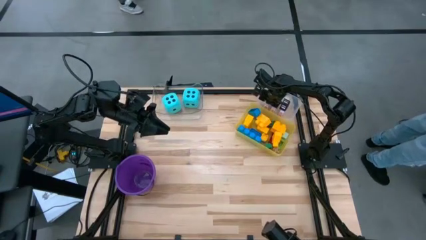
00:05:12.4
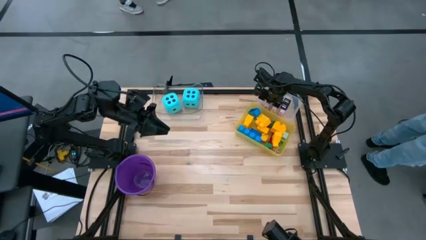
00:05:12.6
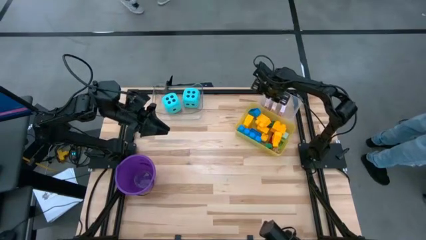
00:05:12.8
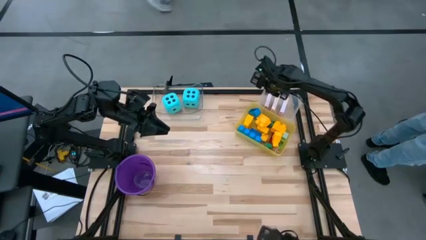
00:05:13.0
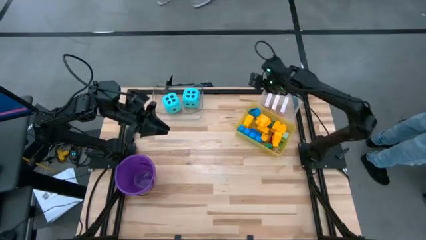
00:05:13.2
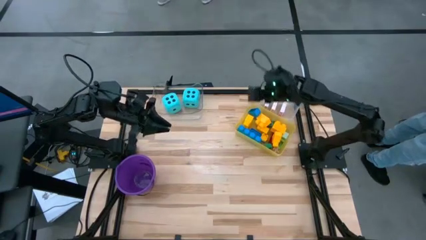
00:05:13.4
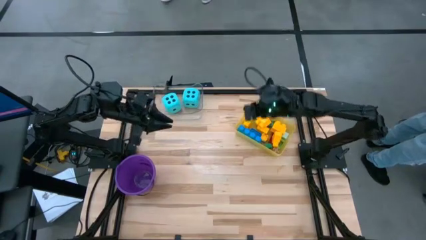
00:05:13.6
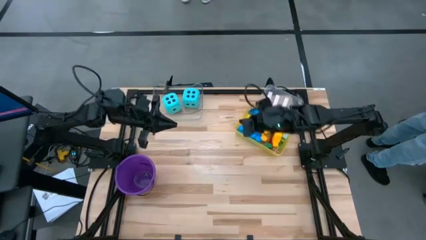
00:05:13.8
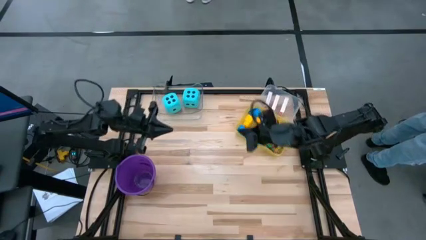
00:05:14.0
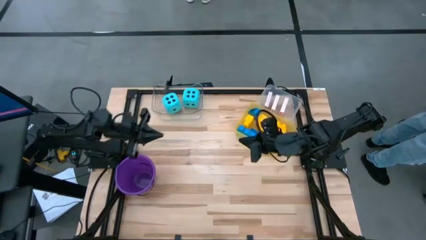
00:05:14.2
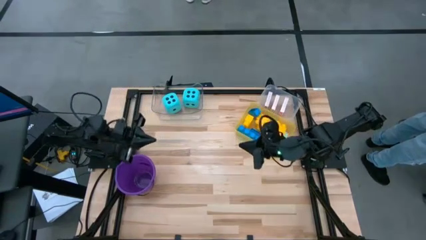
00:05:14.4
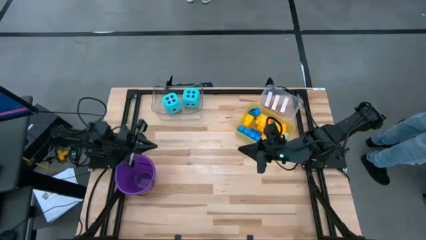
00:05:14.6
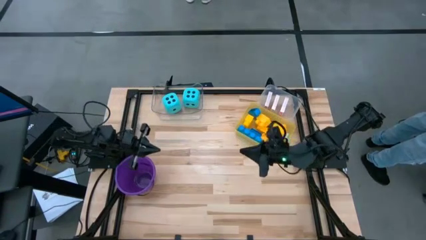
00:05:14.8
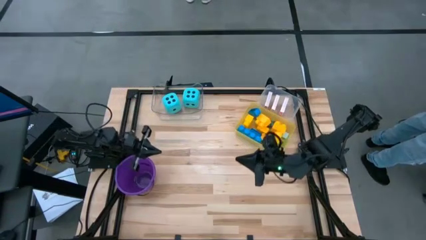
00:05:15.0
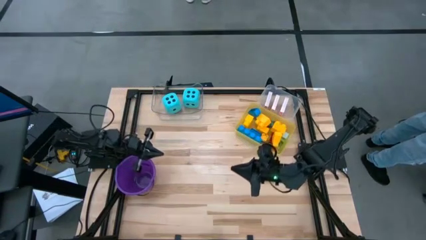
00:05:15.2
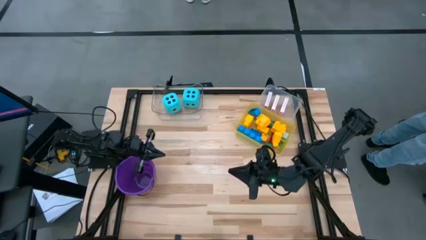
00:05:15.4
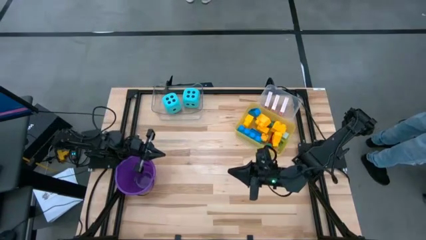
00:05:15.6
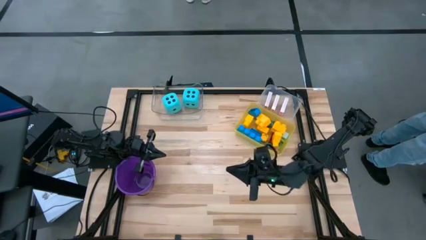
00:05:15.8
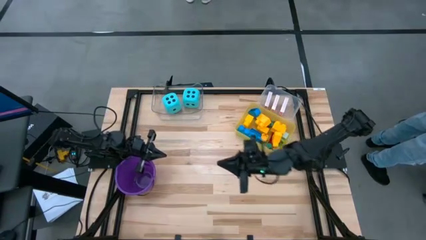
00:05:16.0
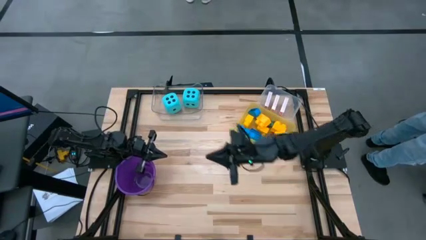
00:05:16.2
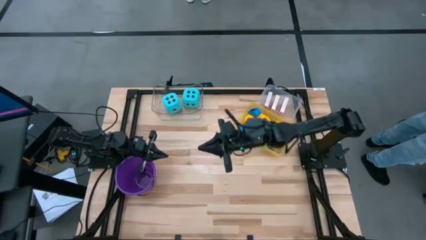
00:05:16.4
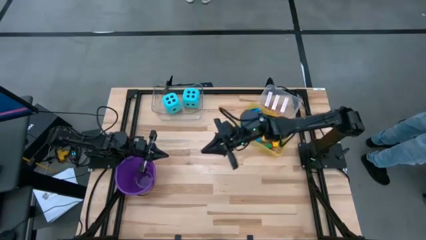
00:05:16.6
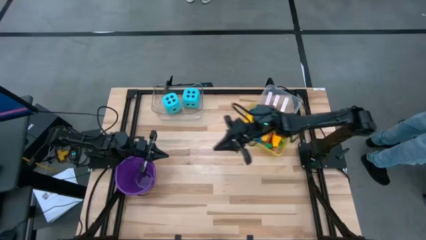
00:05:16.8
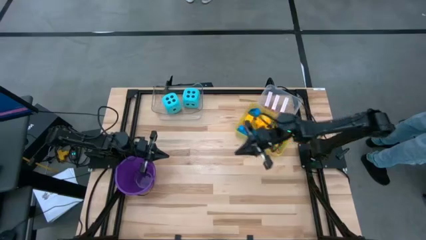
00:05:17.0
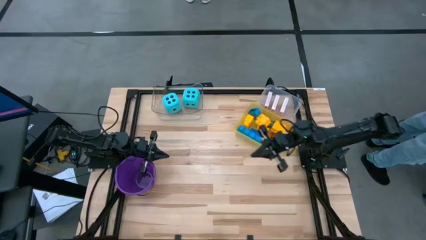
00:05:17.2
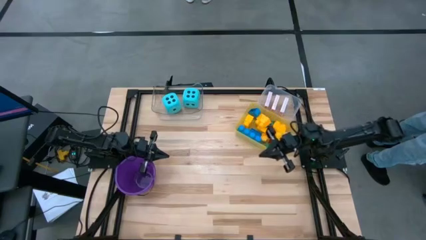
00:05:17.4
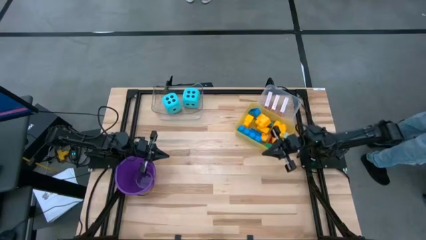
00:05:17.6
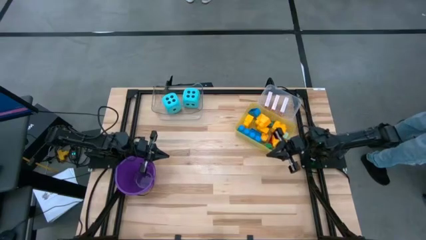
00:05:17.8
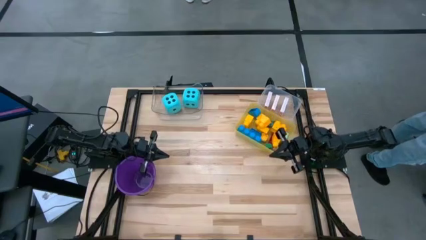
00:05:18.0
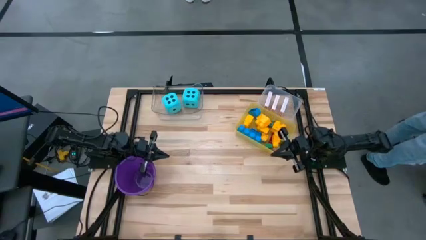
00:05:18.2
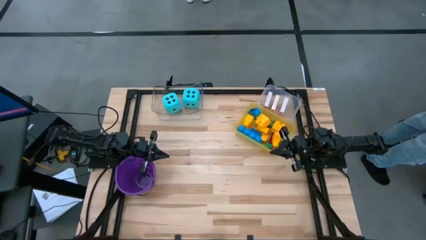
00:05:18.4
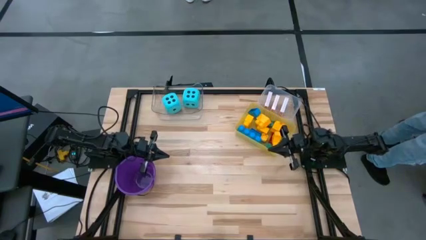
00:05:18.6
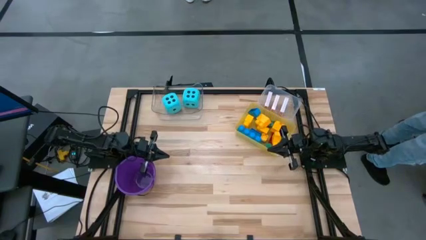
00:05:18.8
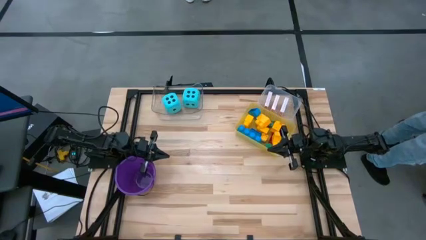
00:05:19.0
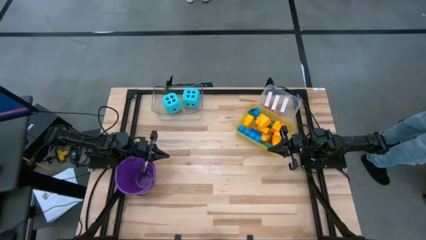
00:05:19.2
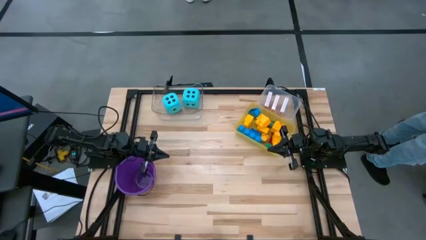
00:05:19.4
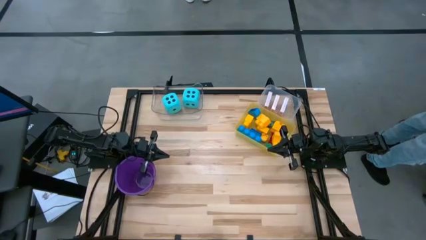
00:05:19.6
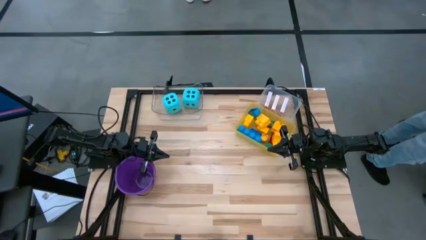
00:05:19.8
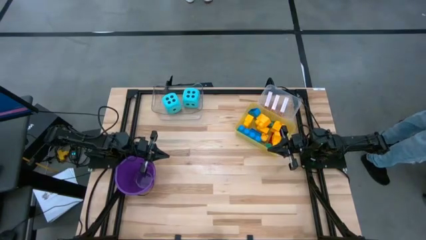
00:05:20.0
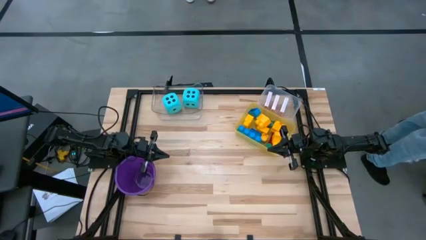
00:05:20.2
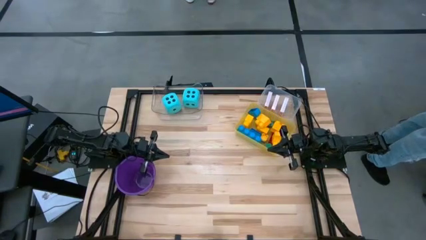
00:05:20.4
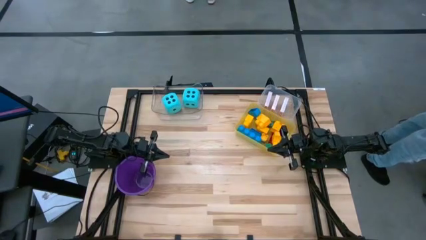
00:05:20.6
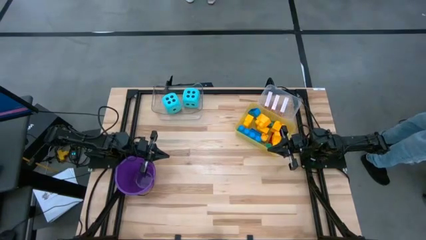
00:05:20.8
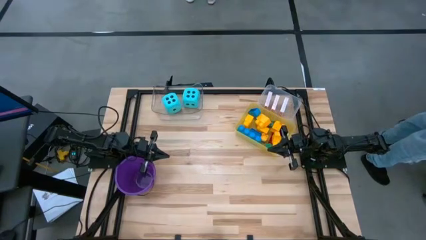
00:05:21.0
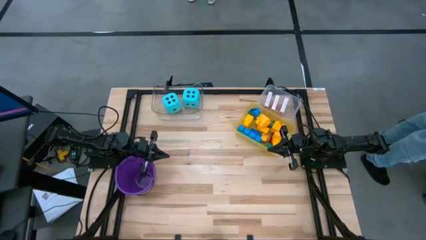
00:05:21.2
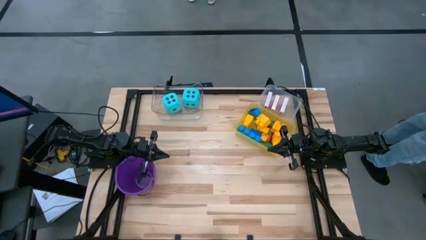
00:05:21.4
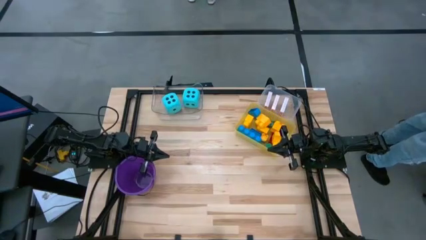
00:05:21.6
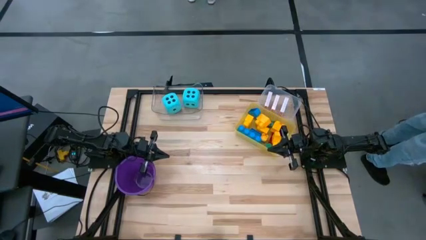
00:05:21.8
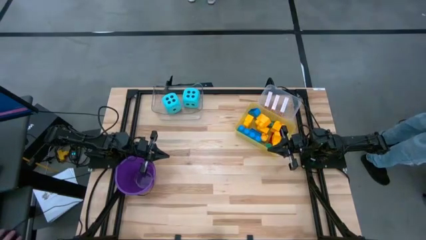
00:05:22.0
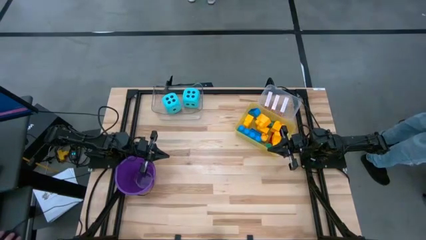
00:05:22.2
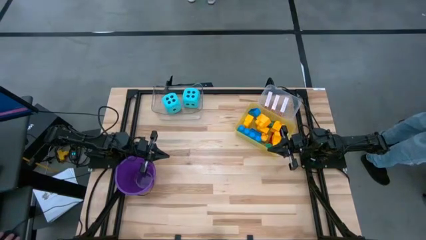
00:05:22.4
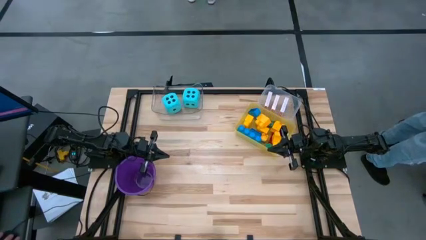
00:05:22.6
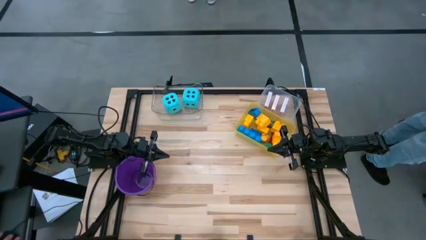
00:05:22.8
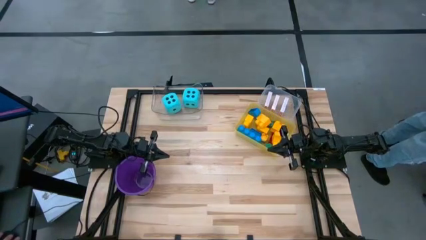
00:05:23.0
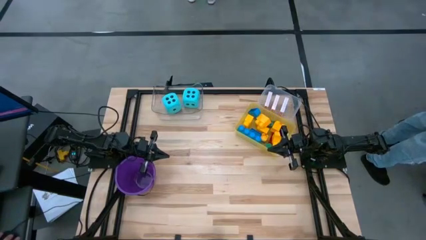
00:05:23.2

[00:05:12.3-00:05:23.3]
Task: Pick & Place Toys
Return to Home Position
